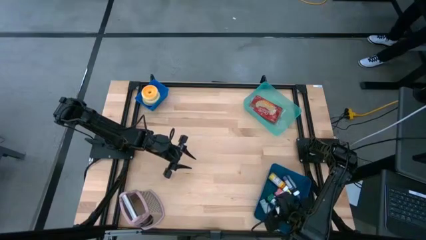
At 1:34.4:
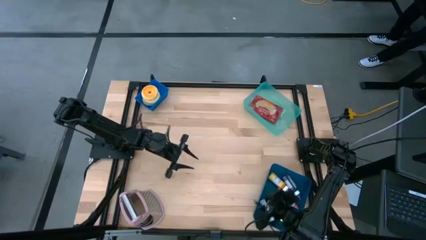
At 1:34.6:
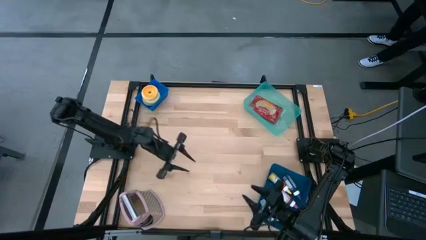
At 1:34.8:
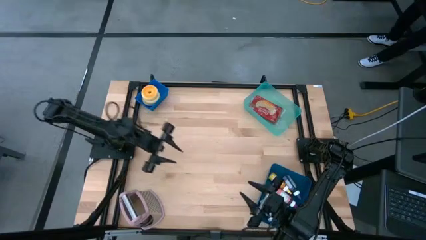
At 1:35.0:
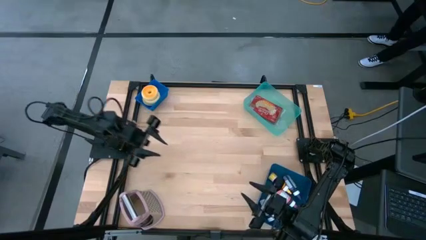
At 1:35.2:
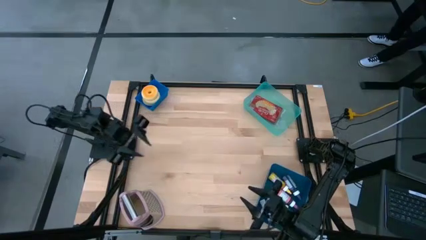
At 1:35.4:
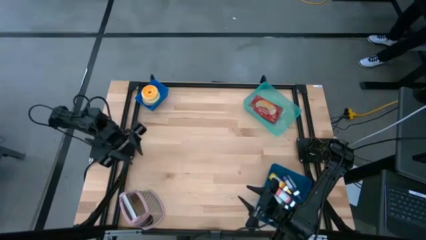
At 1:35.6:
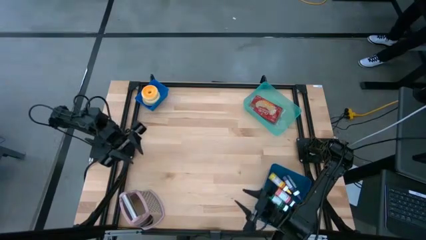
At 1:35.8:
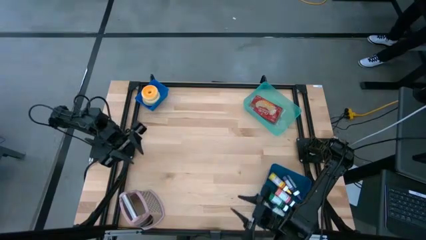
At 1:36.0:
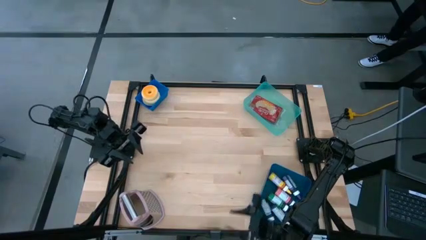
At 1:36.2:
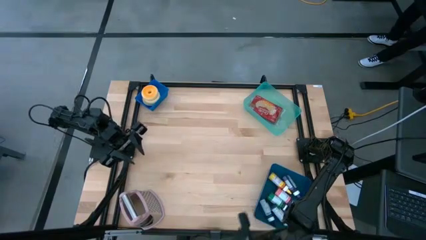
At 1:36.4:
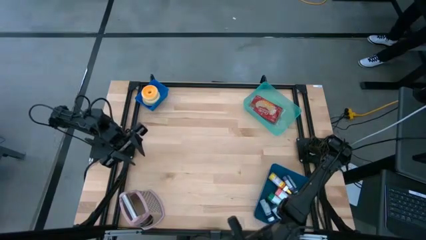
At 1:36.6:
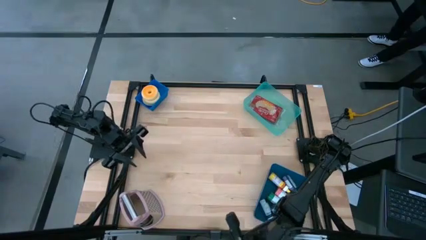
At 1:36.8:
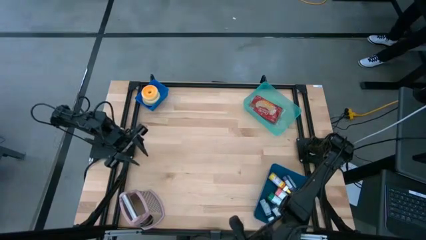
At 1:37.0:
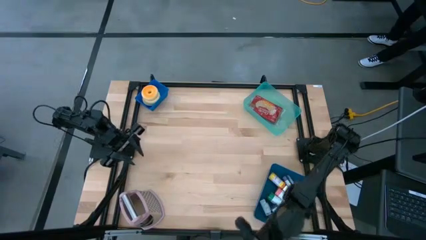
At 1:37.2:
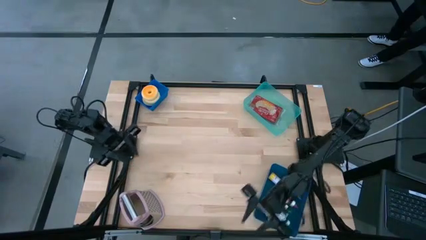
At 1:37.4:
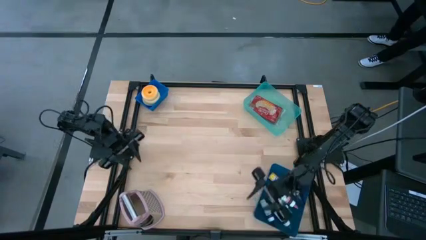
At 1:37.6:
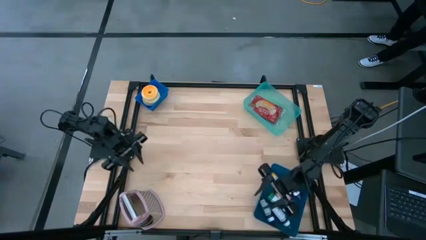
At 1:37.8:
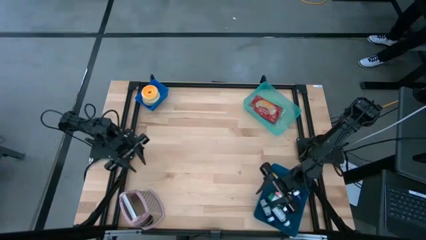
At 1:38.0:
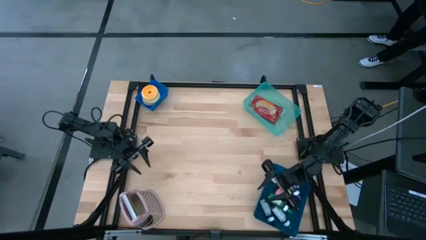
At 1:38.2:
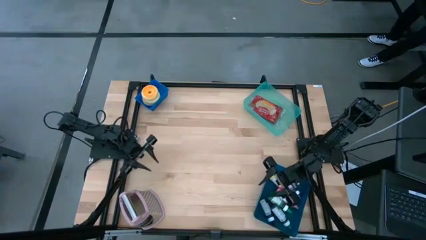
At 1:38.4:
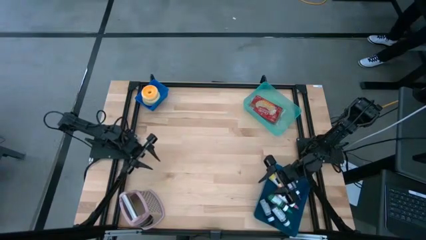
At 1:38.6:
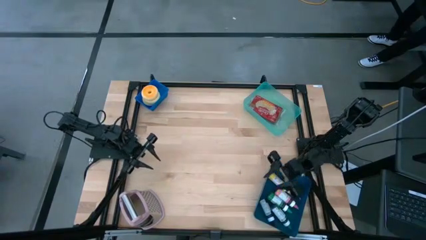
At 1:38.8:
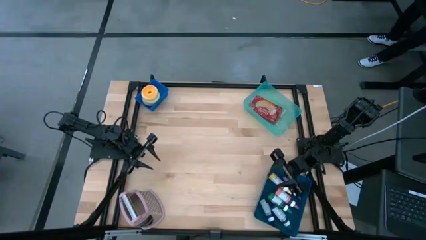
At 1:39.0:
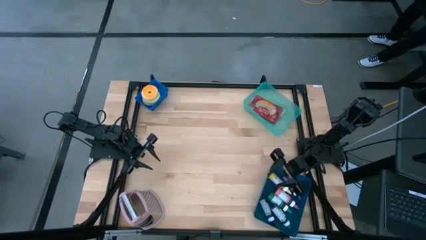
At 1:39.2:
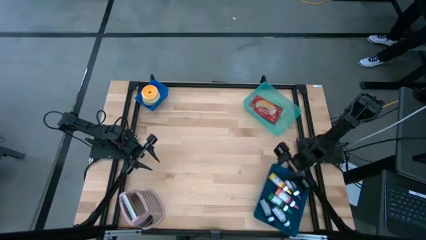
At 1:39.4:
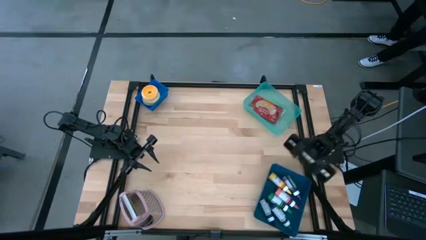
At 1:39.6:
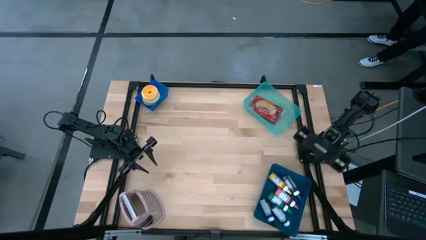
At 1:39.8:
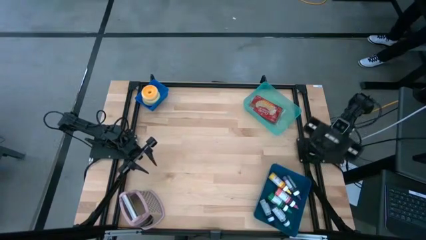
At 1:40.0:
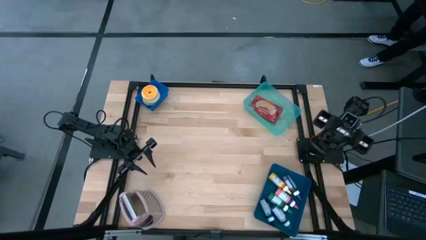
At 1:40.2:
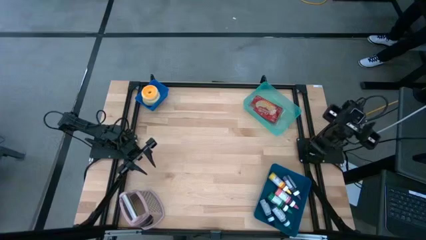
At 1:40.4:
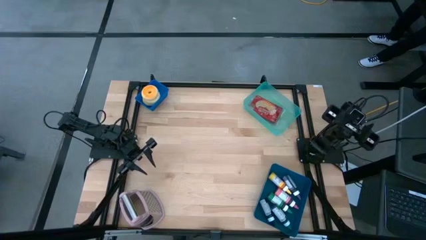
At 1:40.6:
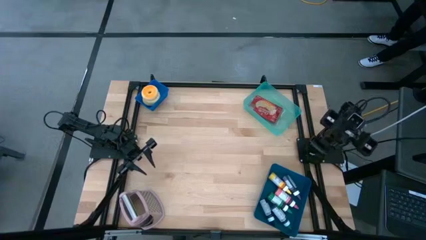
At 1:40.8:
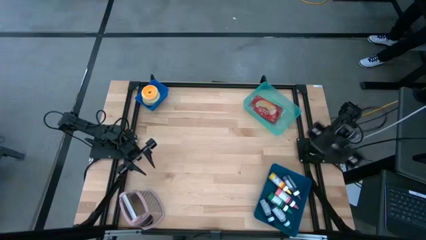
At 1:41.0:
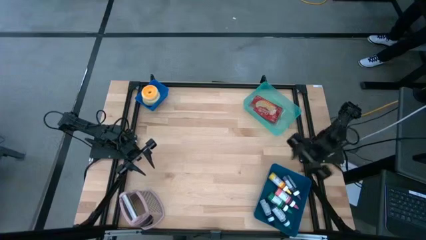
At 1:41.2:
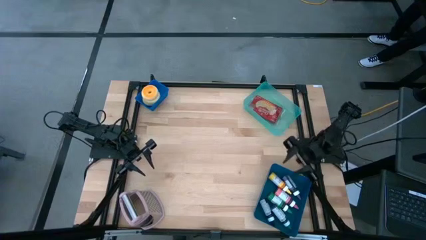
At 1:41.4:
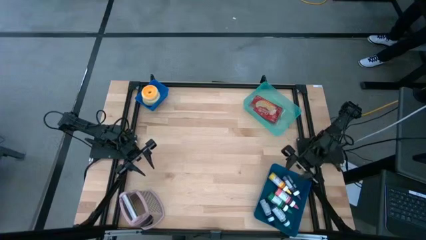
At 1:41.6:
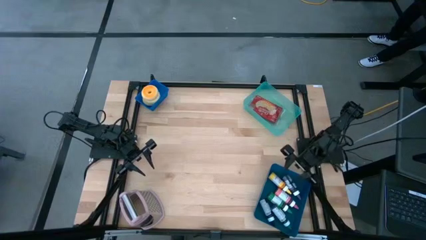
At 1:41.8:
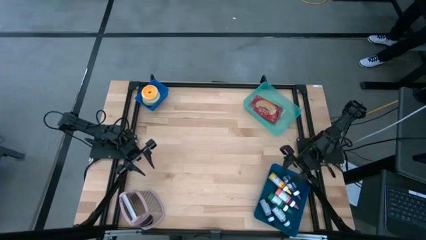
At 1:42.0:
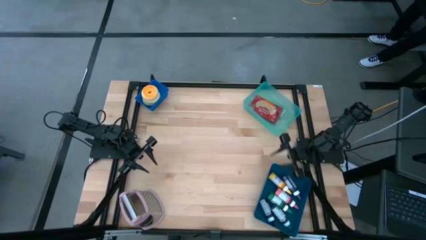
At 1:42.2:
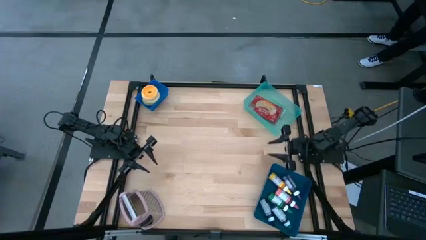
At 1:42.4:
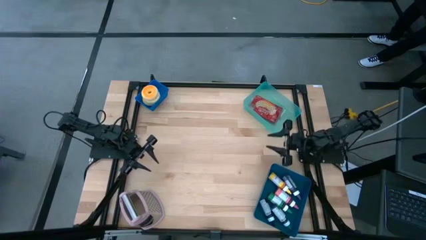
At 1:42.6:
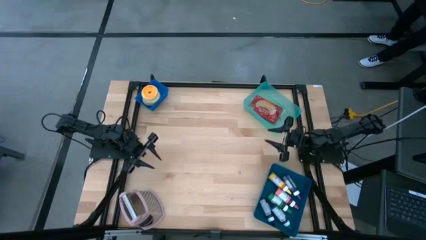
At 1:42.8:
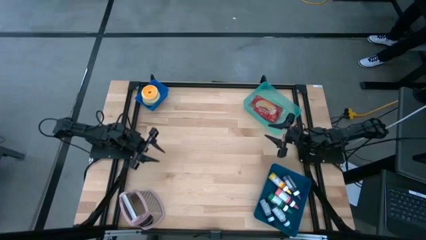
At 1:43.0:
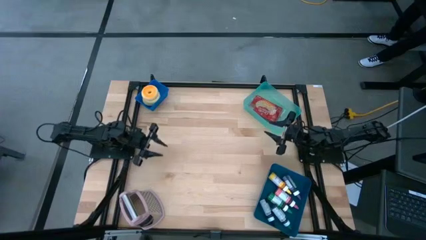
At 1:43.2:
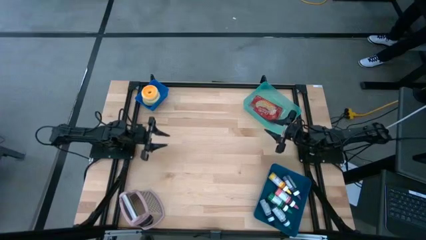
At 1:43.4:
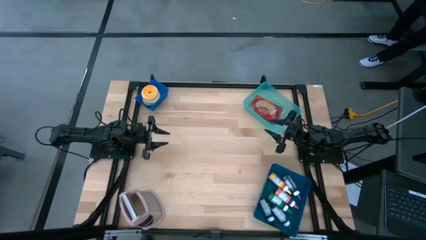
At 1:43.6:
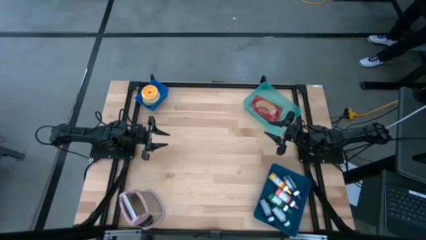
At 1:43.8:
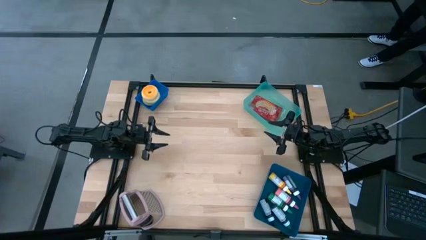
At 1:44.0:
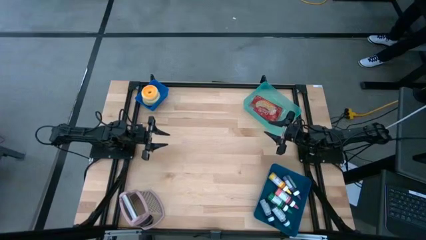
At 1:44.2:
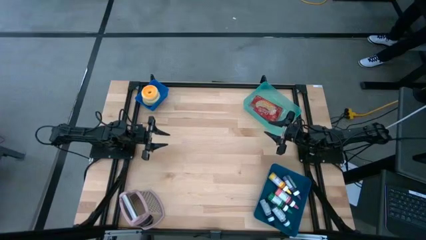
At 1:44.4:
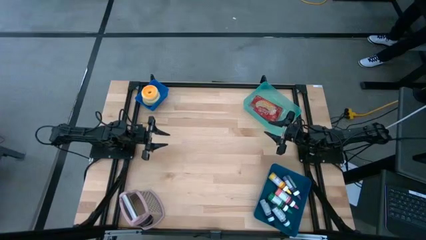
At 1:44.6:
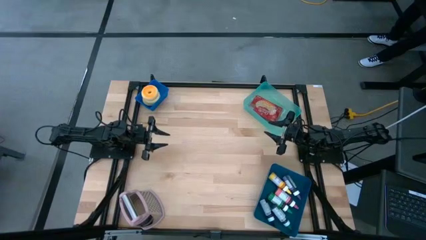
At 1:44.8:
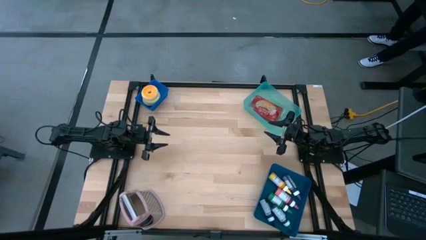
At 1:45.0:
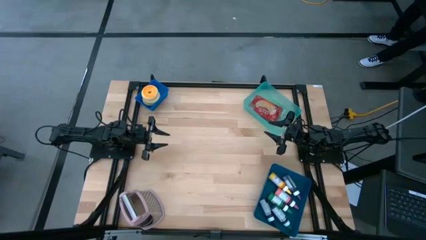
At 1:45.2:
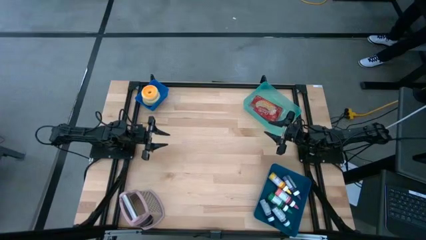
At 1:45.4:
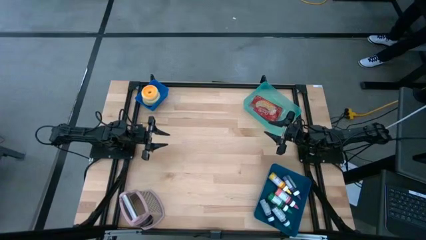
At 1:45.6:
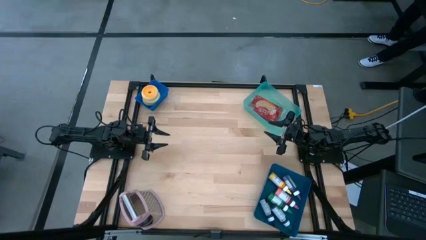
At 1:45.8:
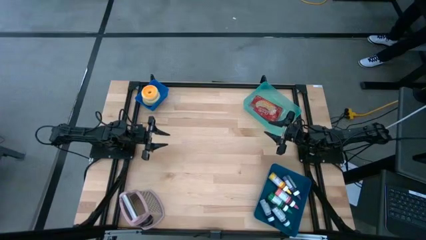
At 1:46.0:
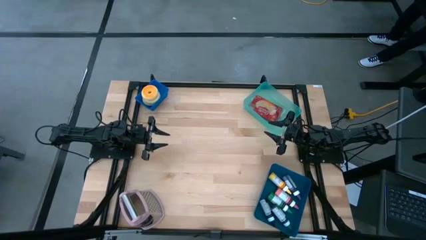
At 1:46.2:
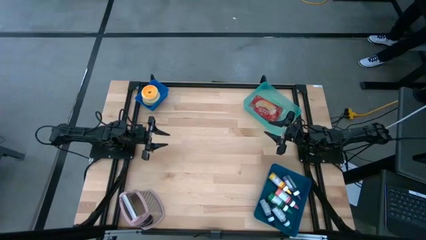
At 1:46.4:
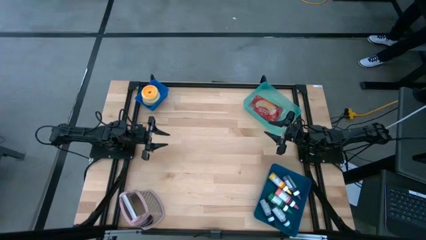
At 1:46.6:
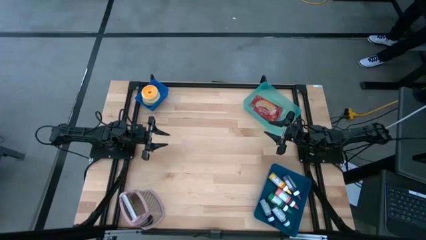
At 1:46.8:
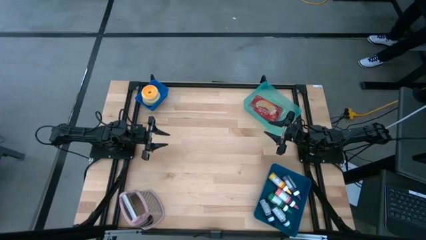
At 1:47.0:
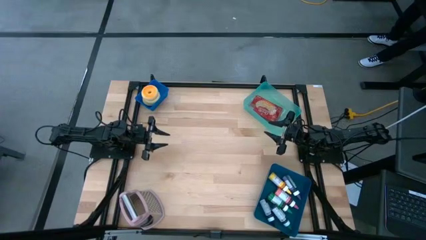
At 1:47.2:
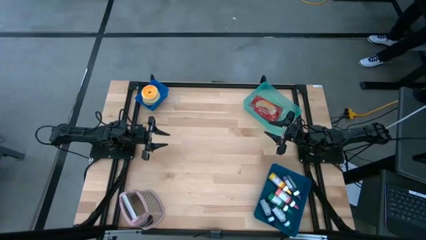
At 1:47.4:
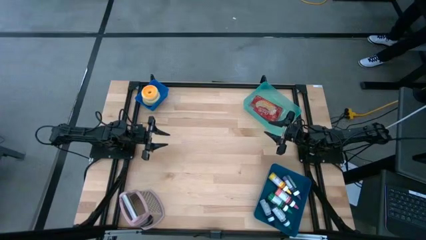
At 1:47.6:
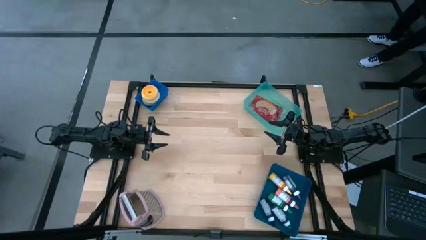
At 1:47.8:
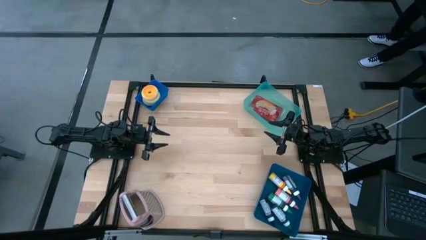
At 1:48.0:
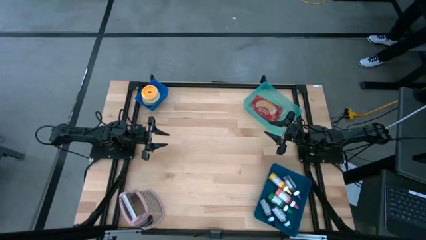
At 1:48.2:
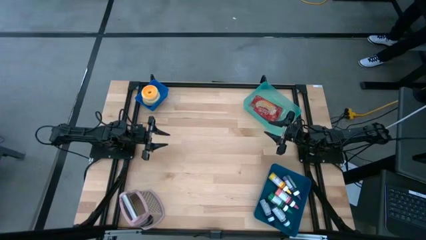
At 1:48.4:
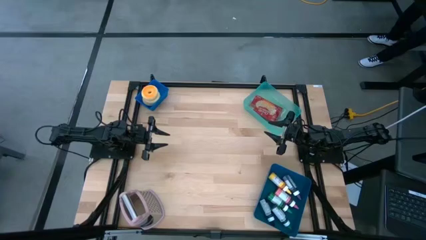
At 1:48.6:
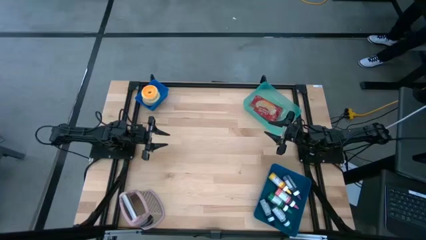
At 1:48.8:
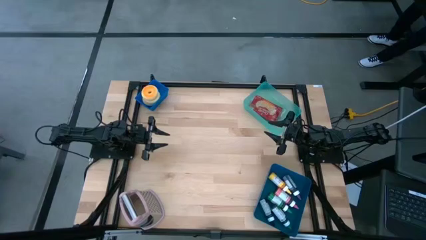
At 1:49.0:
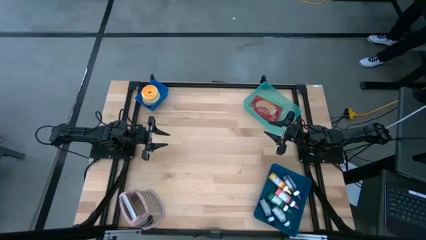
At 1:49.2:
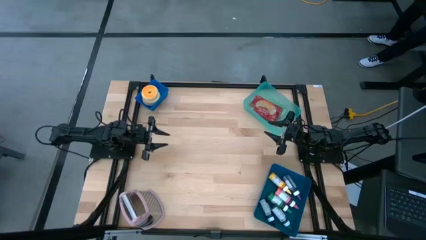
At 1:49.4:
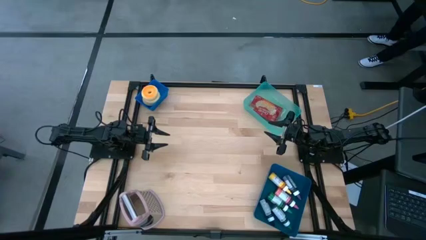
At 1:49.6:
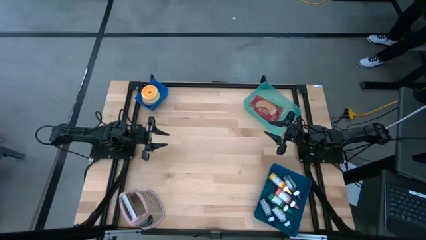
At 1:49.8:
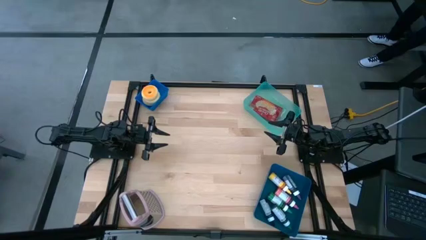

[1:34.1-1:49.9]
Return to Home Position
